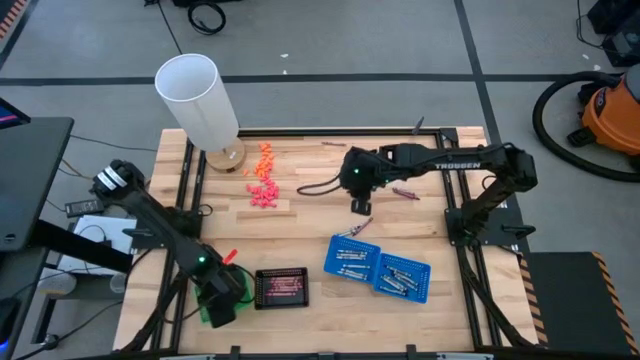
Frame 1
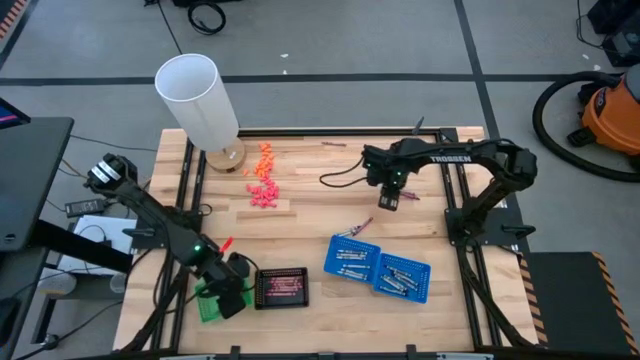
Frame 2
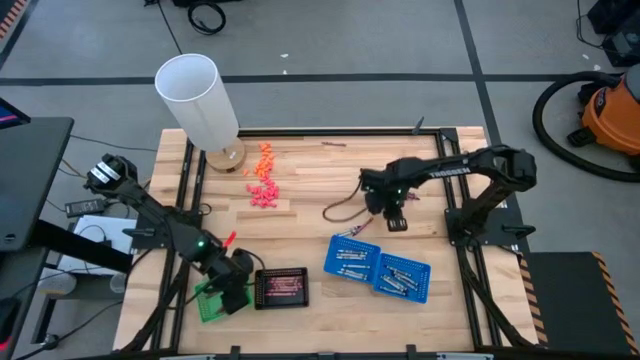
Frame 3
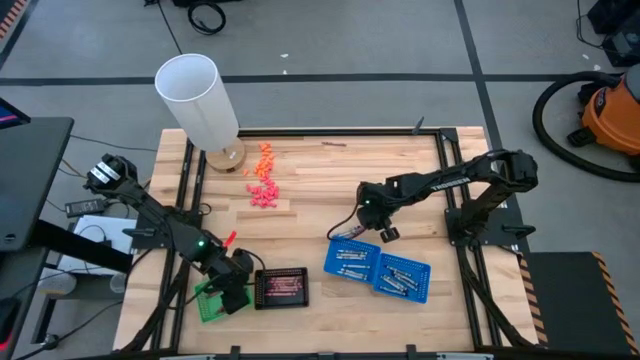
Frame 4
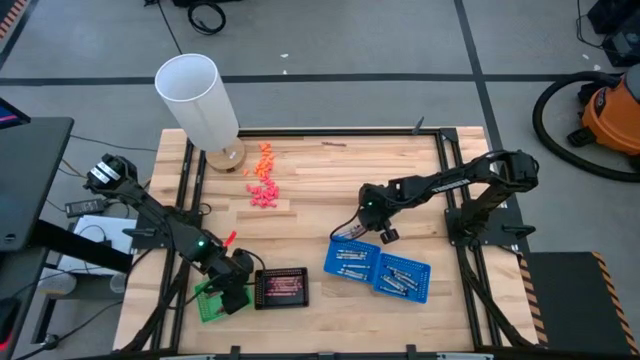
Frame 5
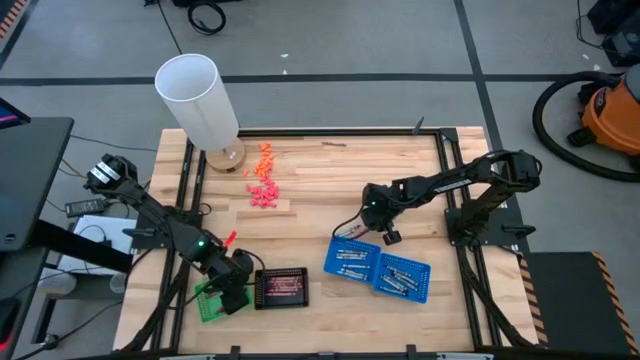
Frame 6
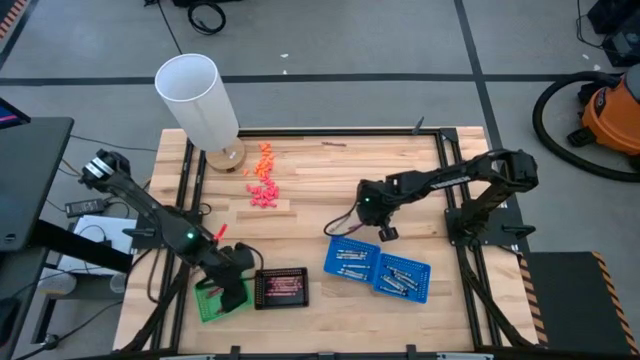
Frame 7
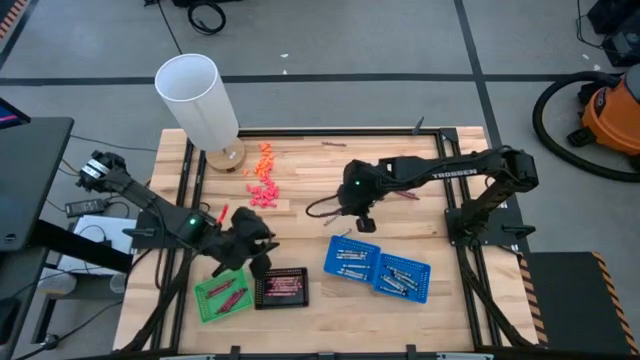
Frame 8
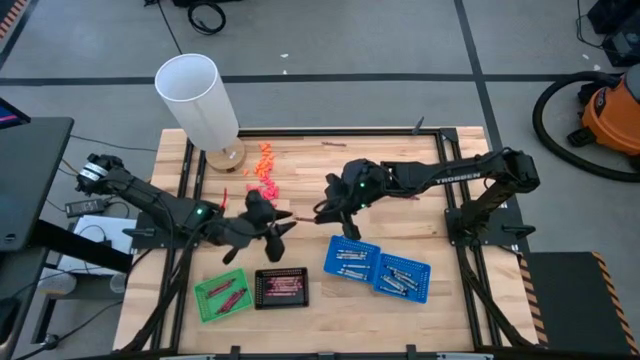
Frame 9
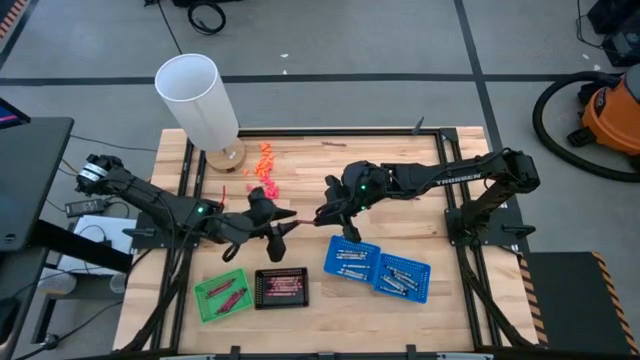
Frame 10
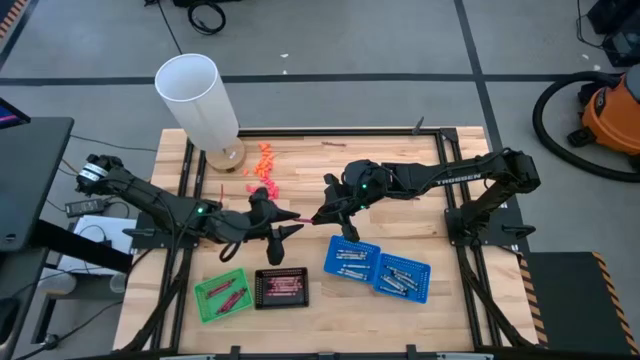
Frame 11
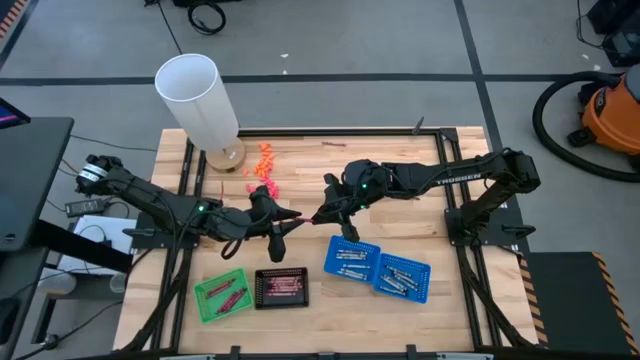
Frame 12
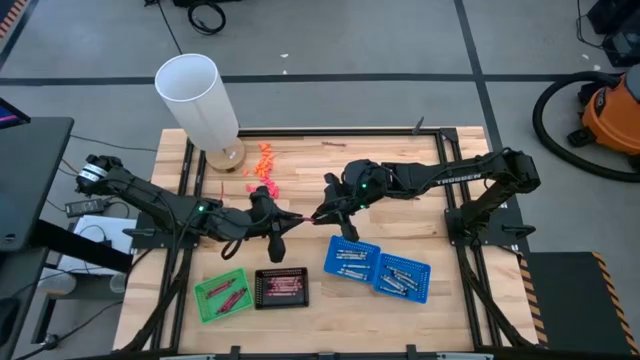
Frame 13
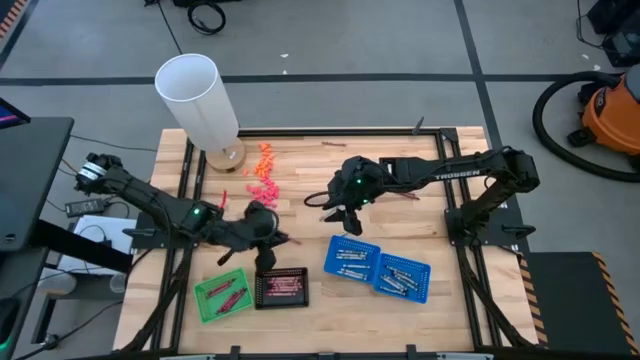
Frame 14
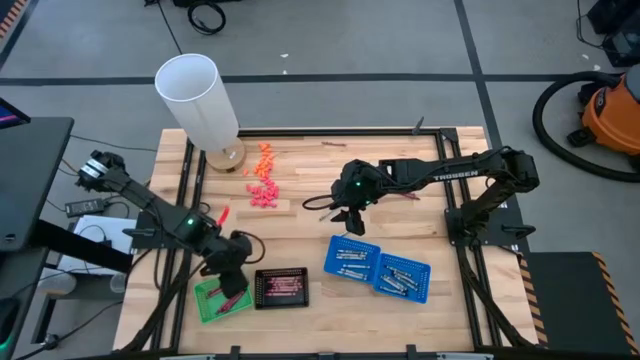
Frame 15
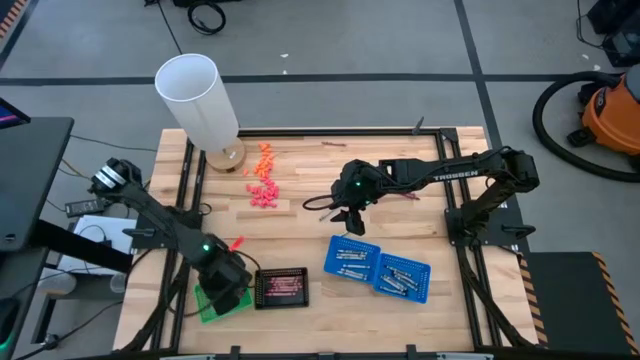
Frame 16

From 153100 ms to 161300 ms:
Task: Sort crayons
Put the red crayon into the green bin

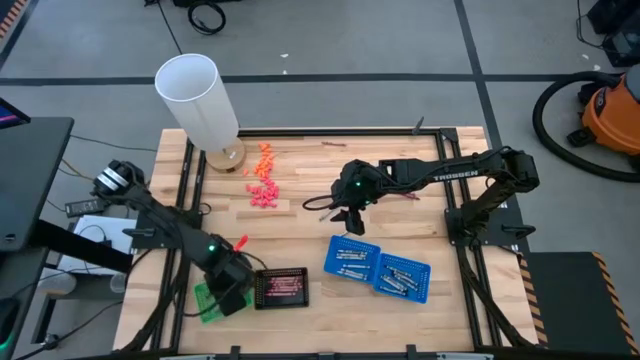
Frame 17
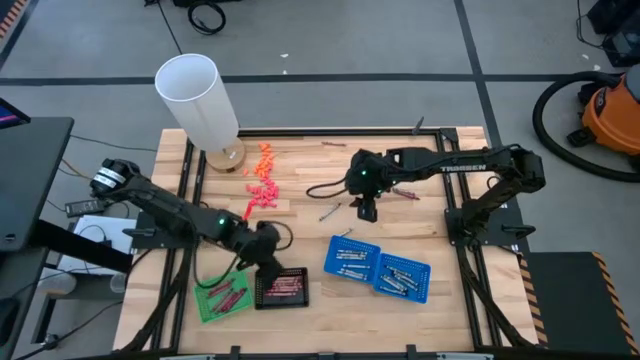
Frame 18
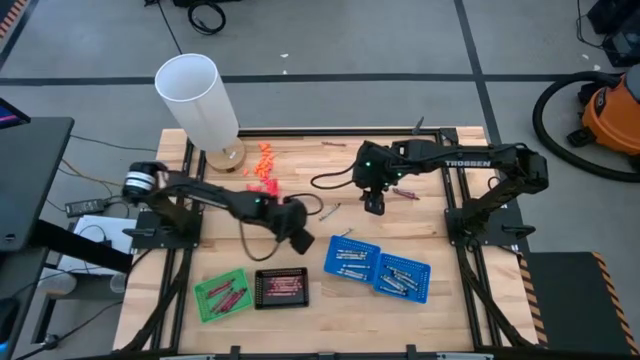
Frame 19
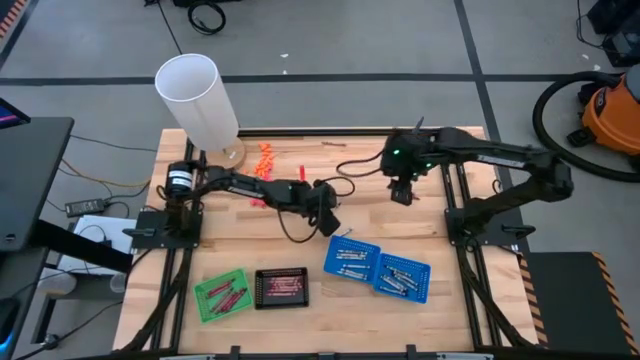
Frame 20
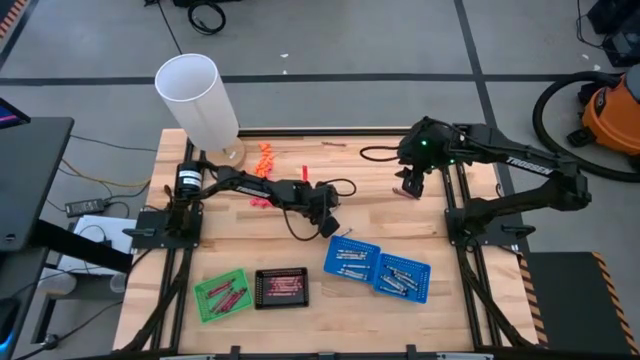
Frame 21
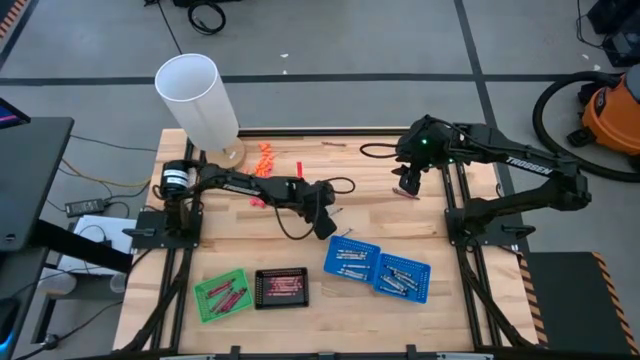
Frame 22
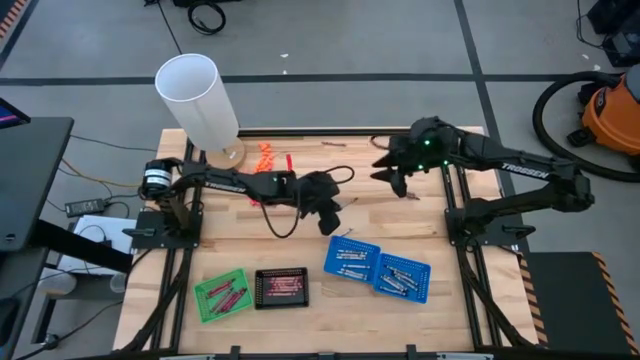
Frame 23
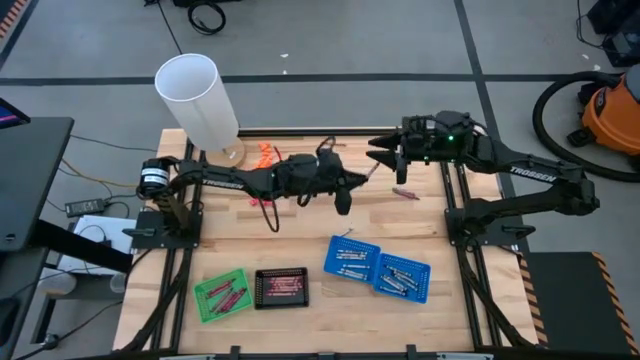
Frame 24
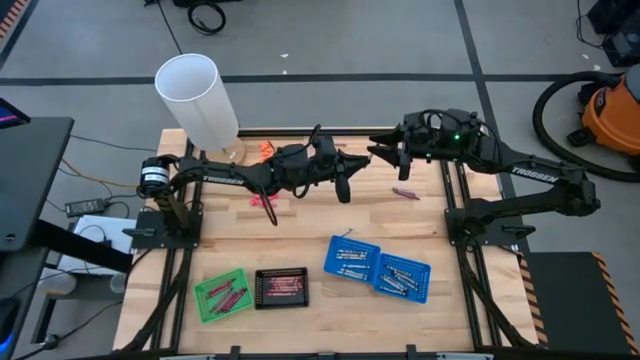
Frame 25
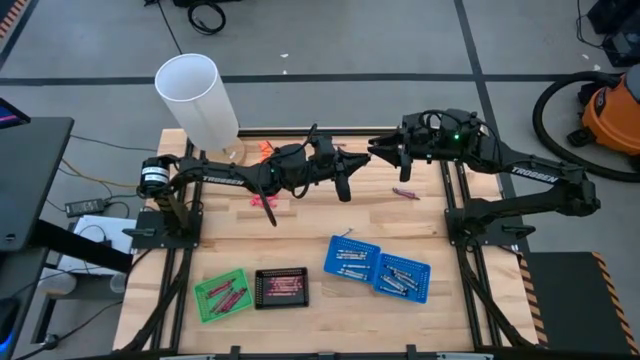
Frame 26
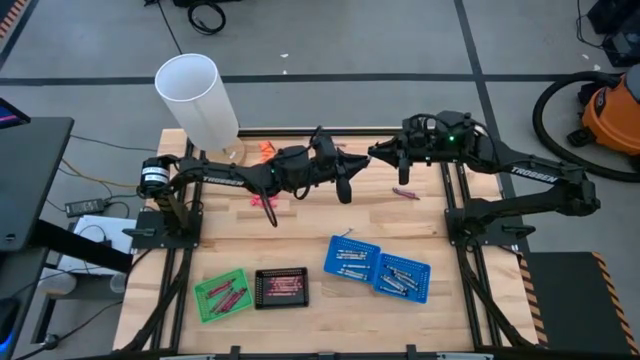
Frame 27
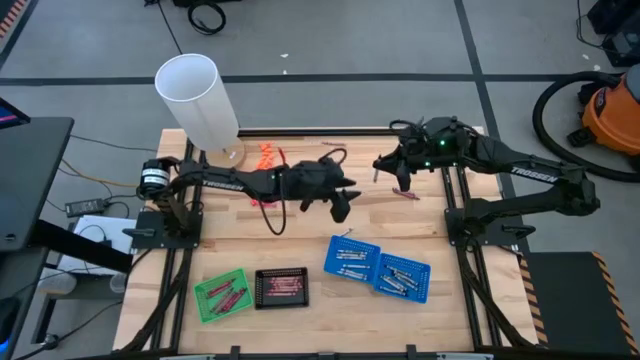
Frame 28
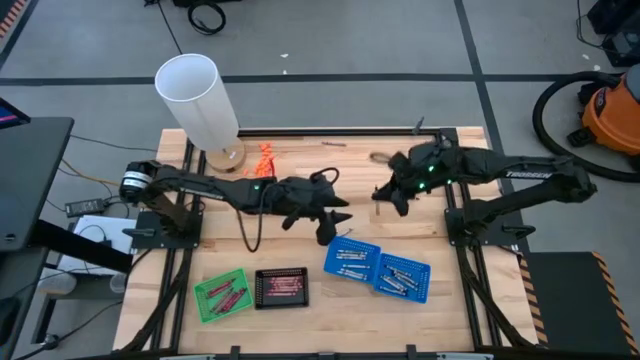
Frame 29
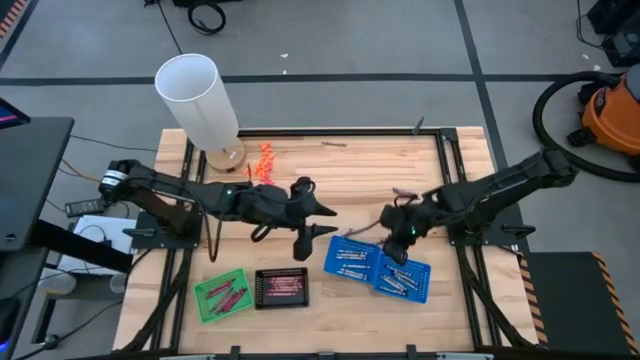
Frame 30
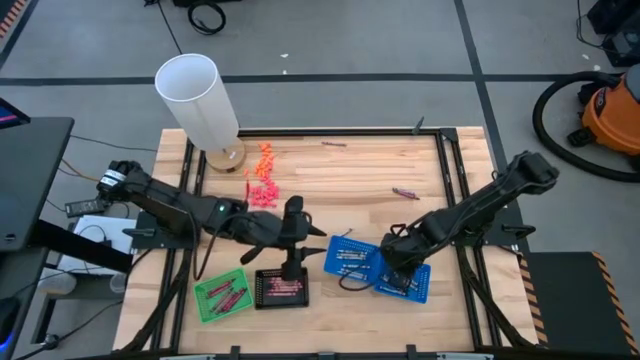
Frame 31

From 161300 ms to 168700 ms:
Put the black crayon into the right blue bin

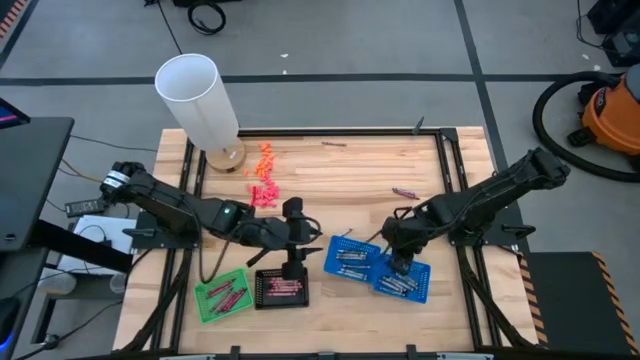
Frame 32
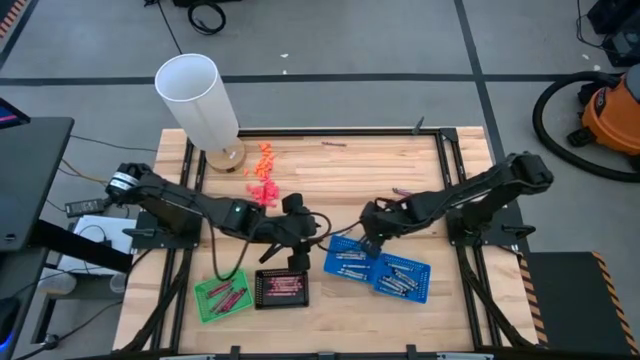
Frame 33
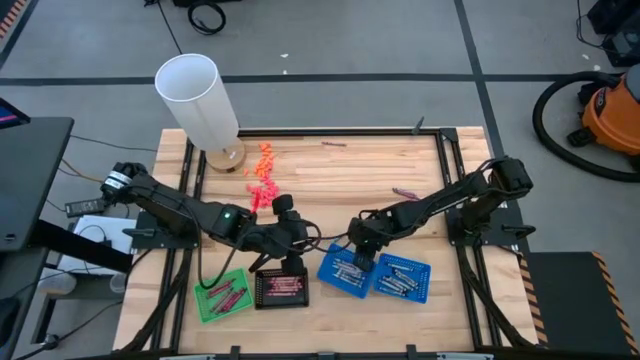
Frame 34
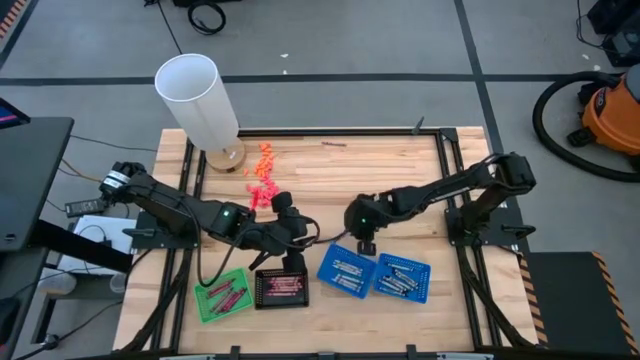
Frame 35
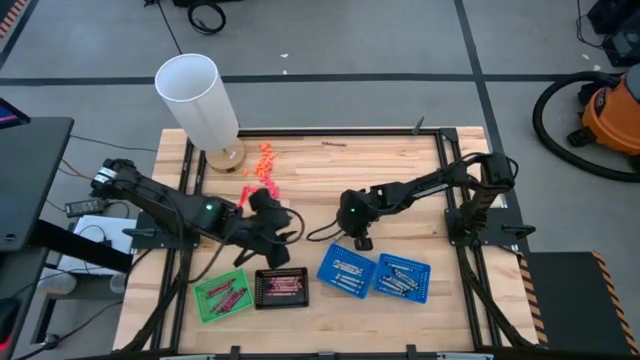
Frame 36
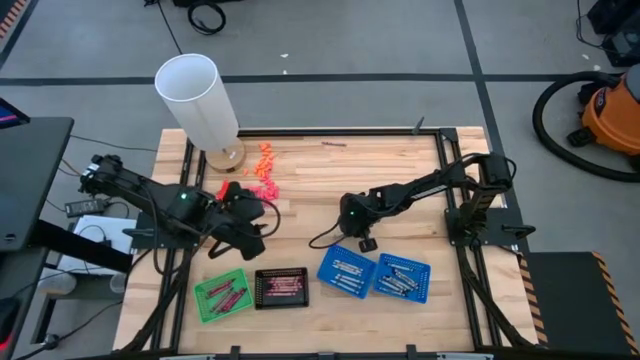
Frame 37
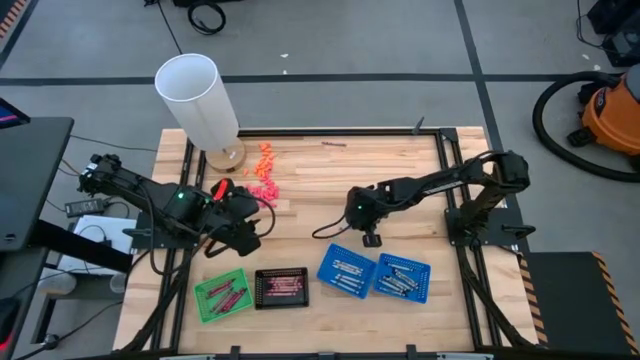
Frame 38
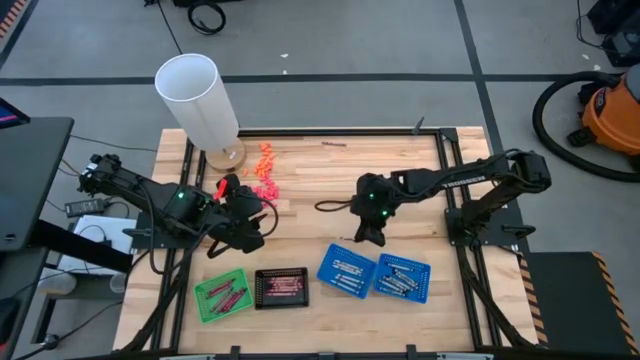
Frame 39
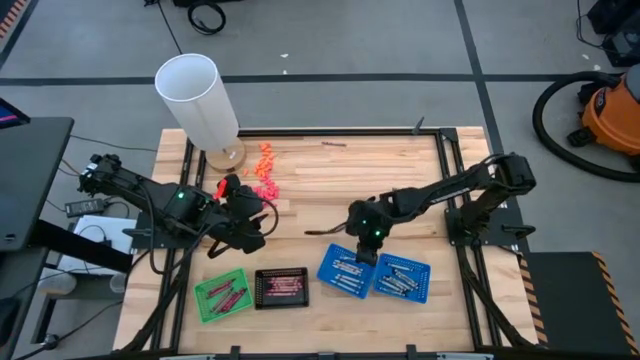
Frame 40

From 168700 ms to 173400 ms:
Put the white crayon into the left blue bin
